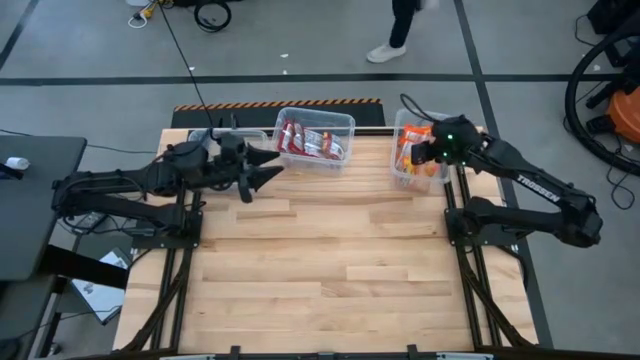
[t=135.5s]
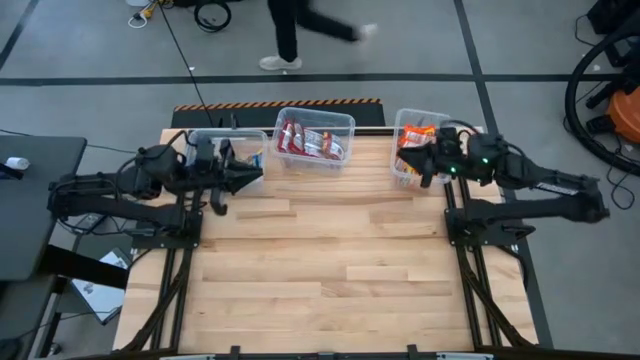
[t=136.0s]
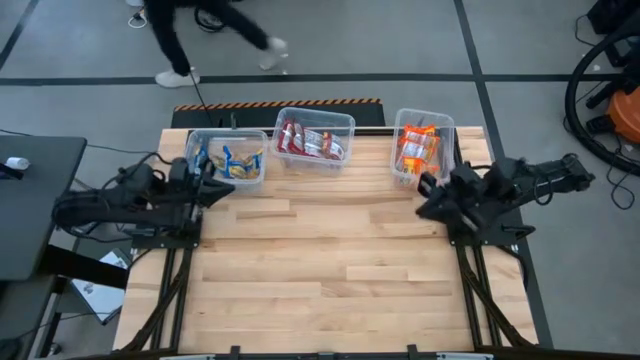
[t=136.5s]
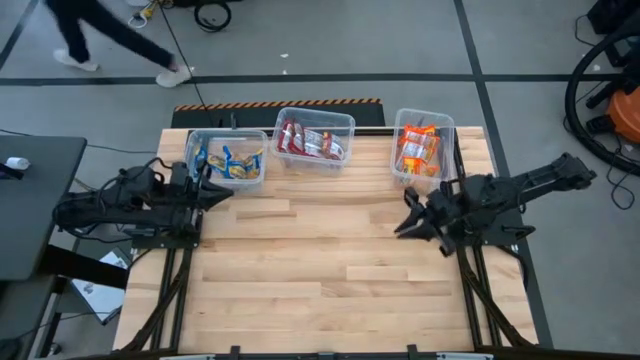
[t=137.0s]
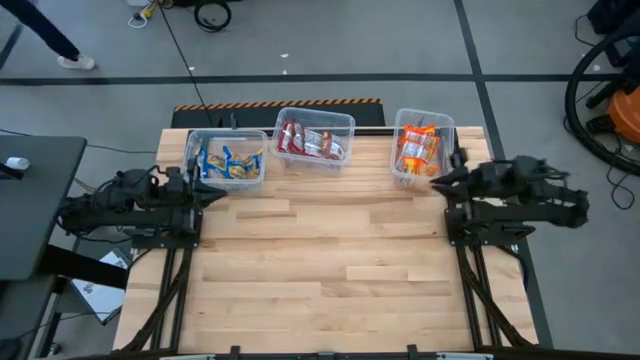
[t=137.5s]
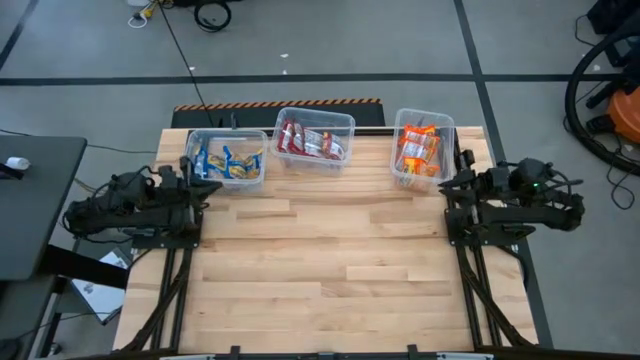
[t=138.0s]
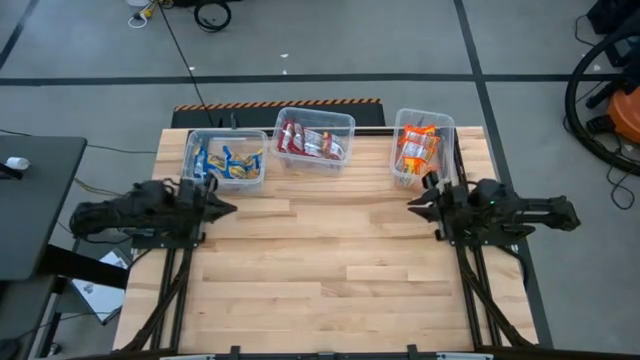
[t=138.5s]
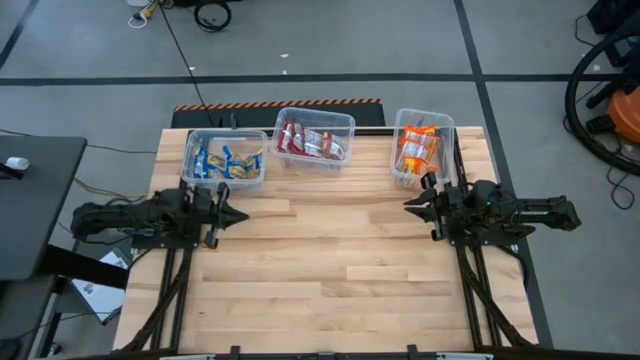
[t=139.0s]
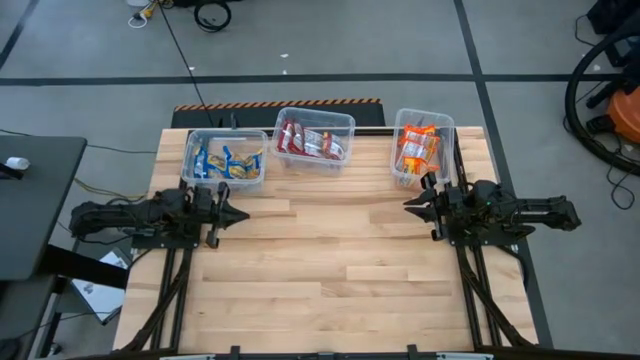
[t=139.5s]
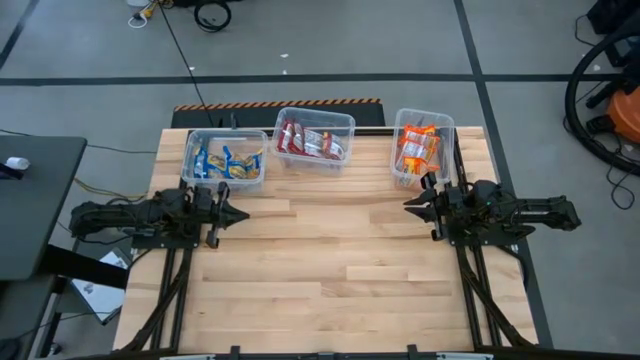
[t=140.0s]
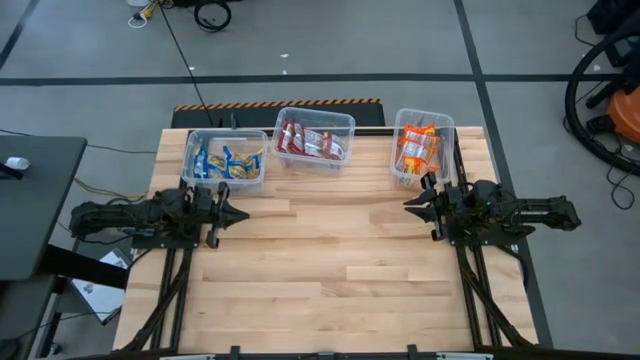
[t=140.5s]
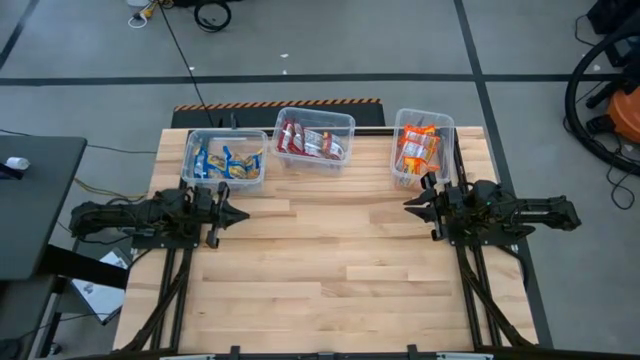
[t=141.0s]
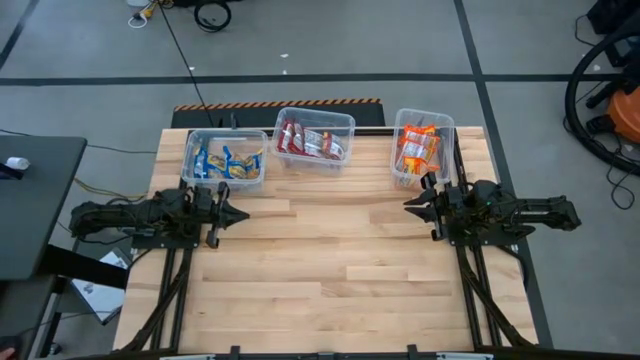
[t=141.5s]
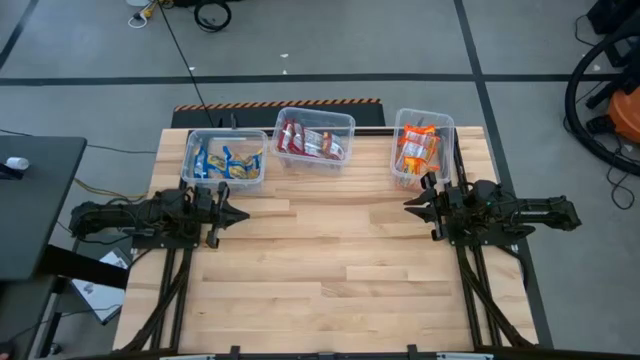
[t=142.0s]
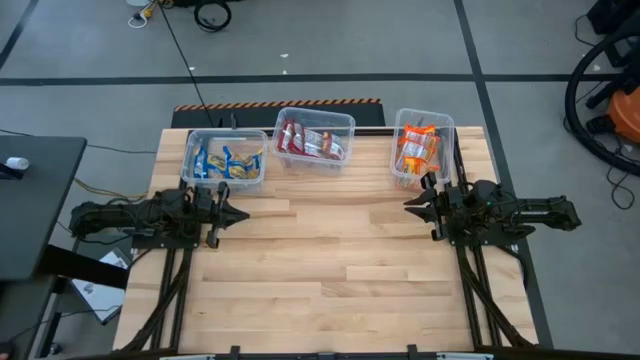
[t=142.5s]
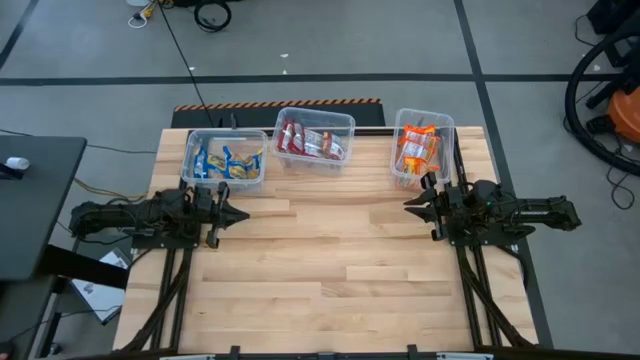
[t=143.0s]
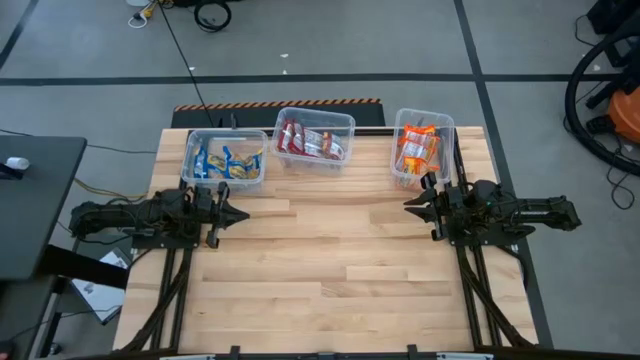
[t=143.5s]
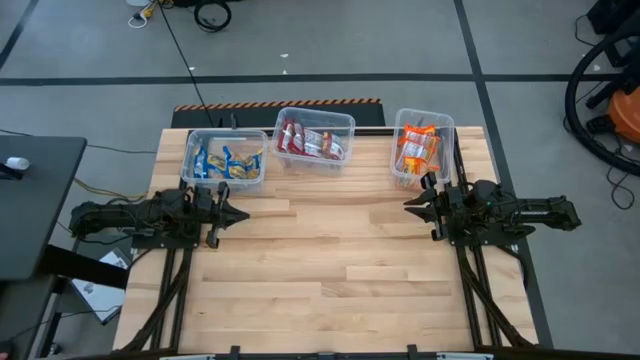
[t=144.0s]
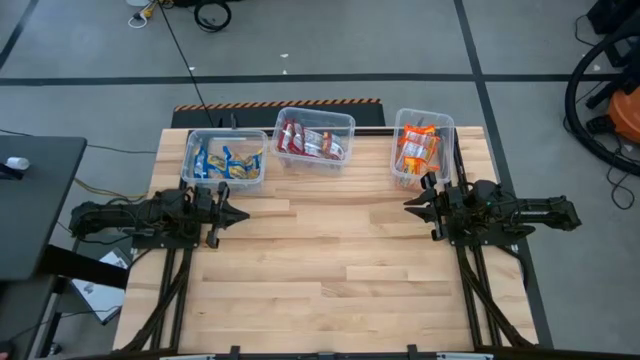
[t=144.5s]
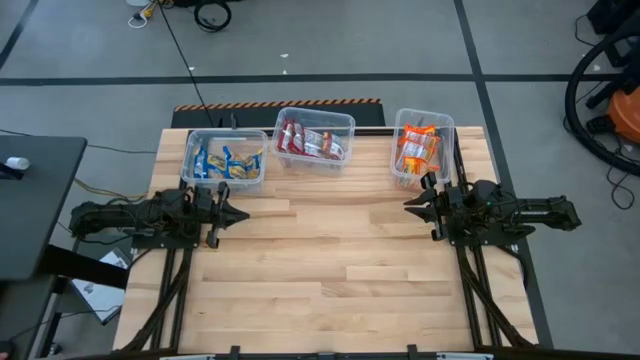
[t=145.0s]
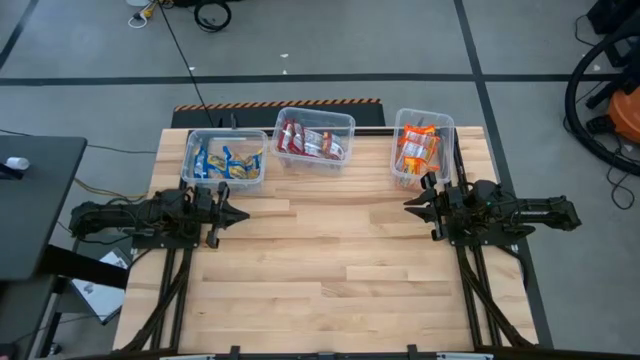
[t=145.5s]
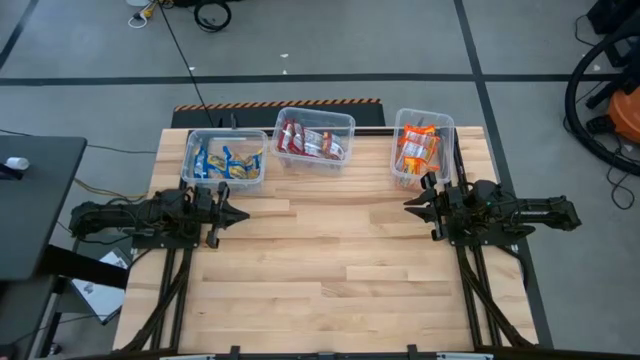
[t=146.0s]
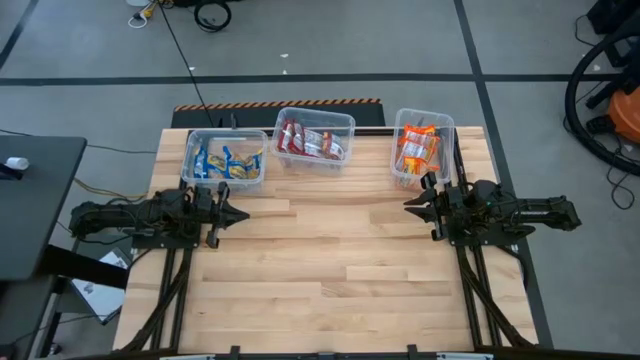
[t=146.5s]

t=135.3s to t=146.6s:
Task: Sort Maruchan noodles
Return to Home Position

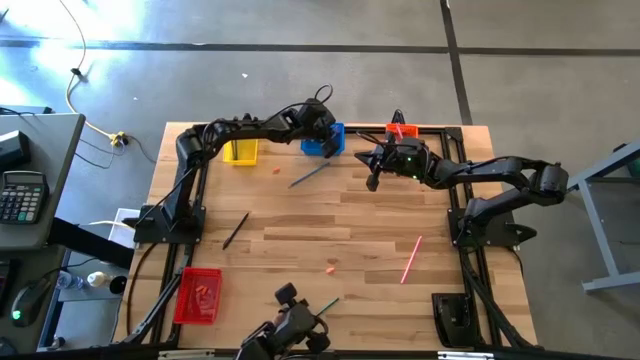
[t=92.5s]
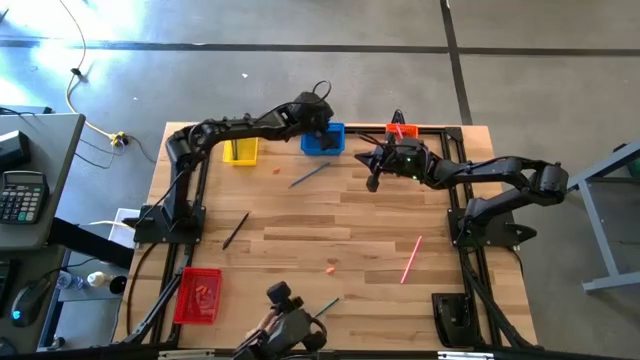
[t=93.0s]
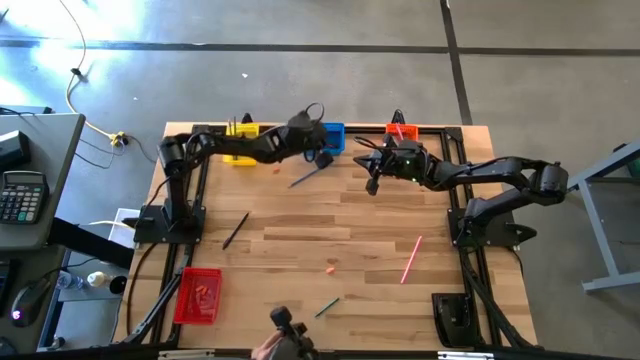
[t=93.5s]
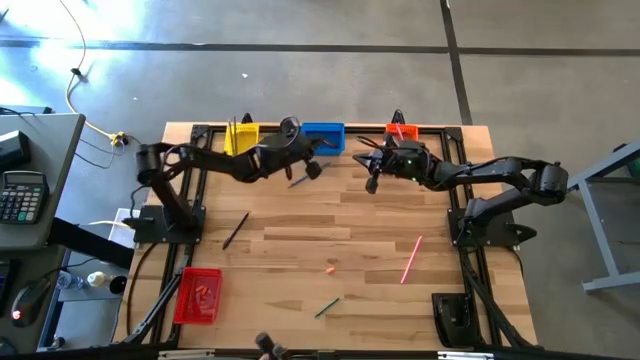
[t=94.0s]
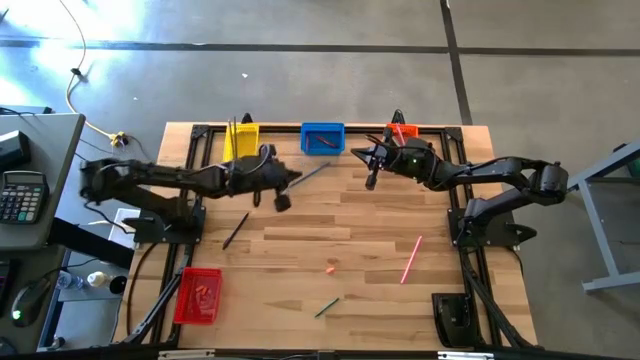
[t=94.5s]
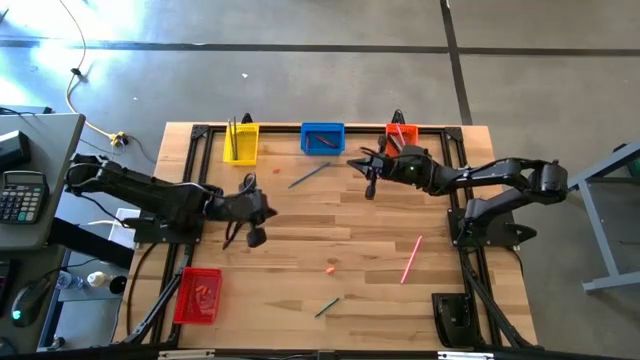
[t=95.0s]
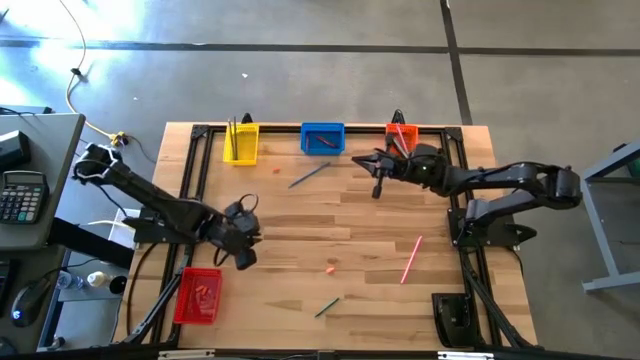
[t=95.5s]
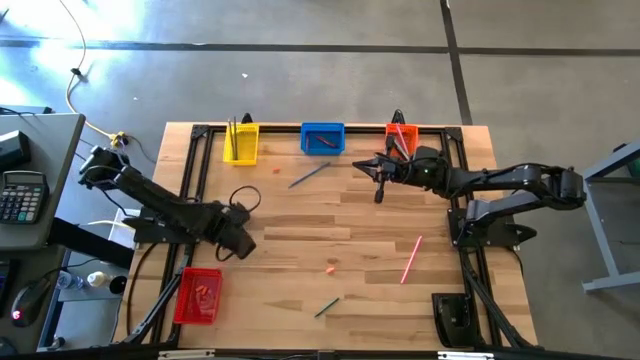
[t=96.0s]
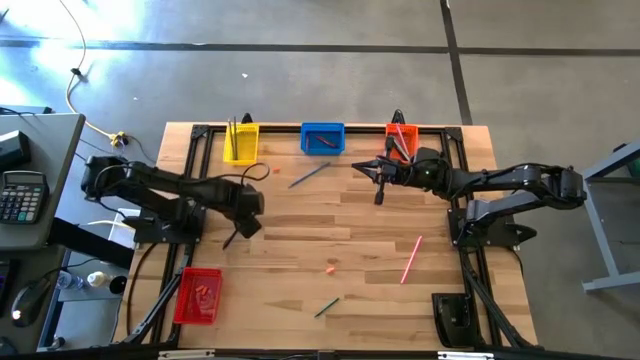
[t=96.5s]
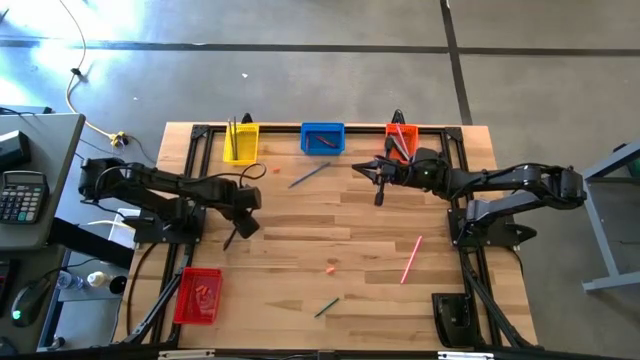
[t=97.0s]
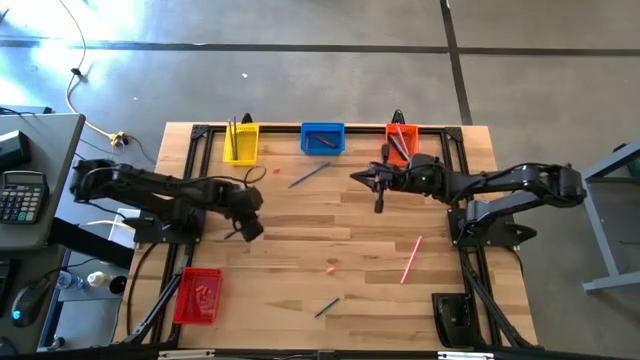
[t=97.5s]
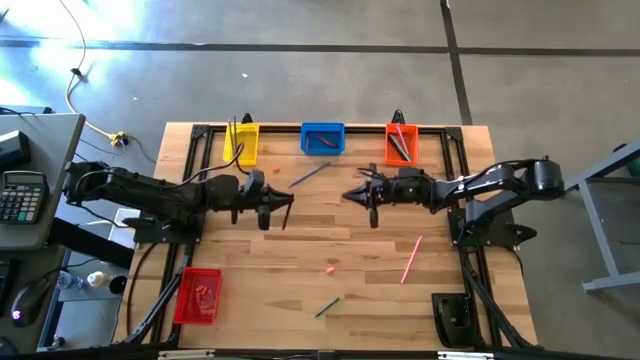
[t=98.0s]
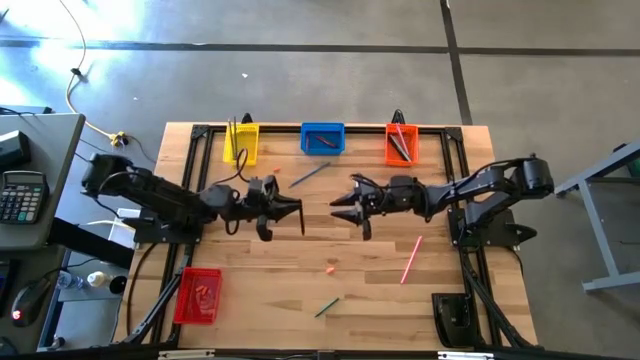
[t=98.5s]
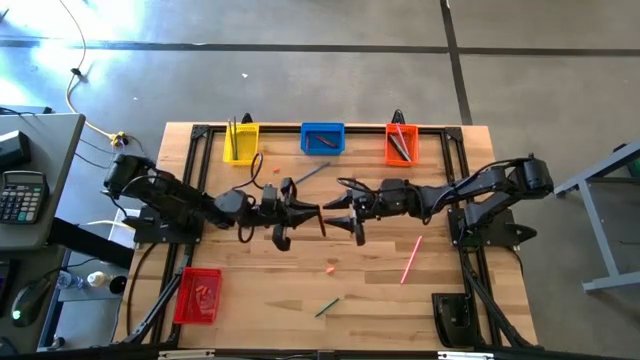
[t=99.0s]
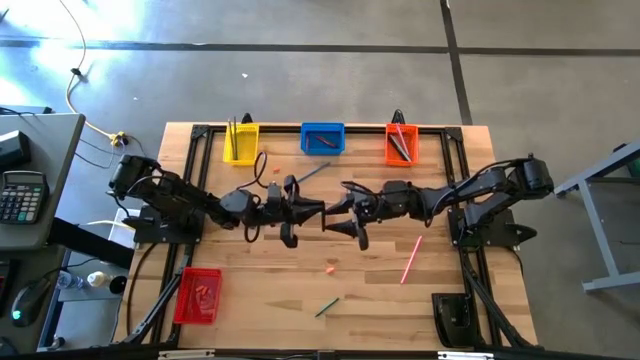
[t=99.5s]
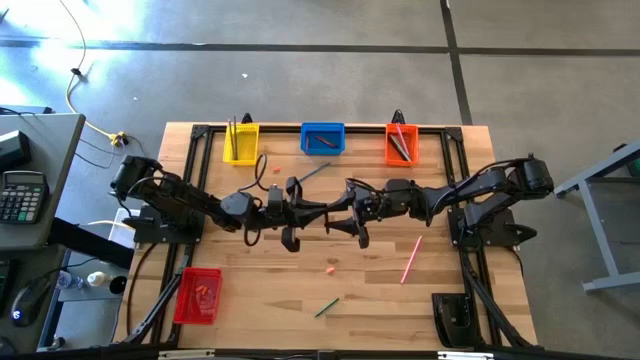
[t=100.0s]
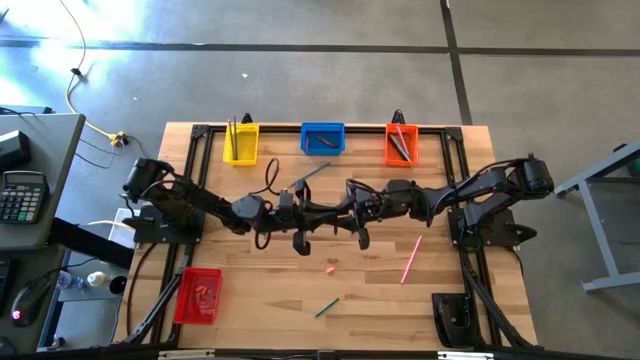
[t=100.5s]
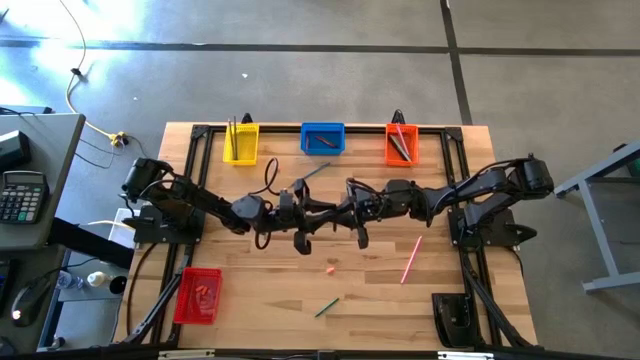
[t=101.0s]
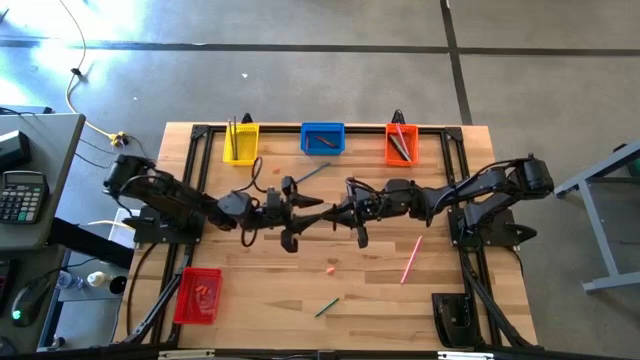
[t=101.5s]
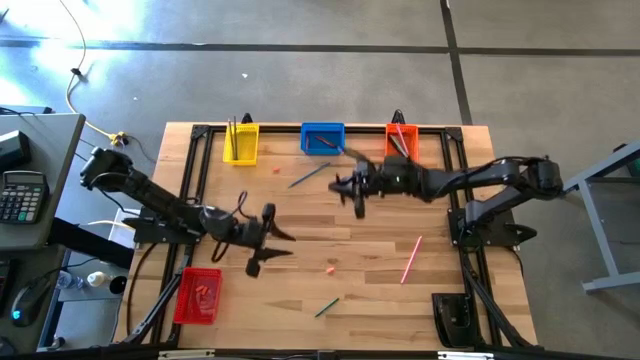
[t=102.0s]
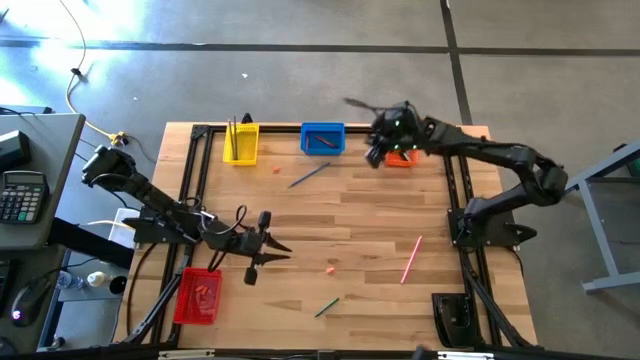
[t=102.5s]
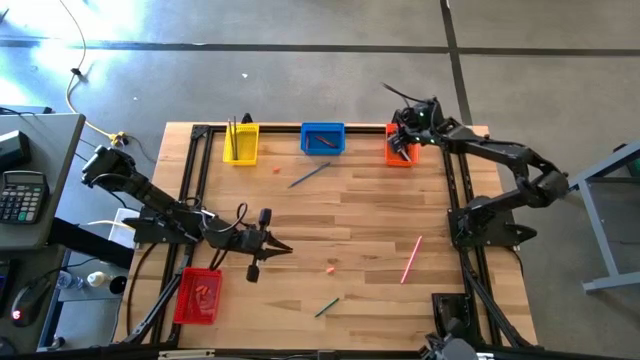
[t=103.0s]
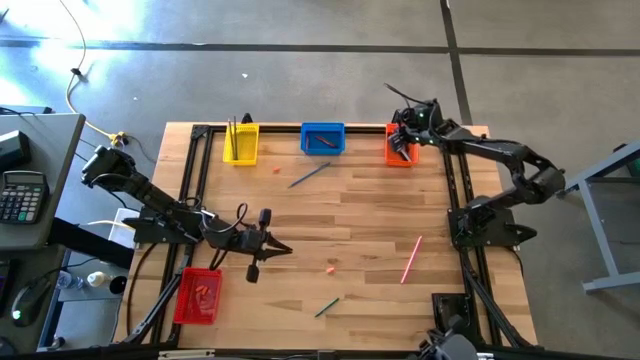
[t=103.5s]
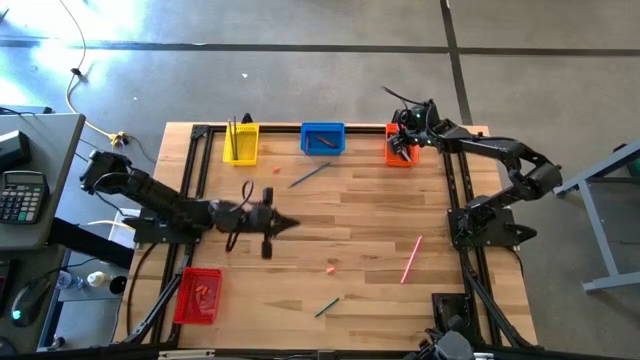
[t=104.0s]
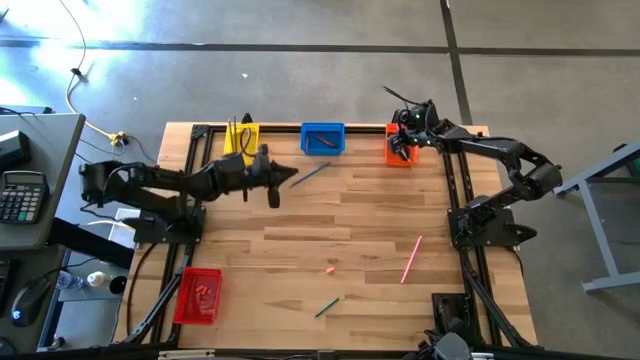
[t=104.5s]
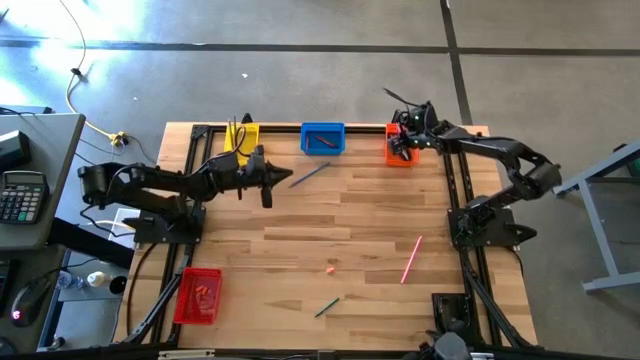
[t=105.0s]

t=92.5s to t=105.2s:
Task: Sort crayons/erasers/pens/pencils in bins
Put the black pen into the orange bin
